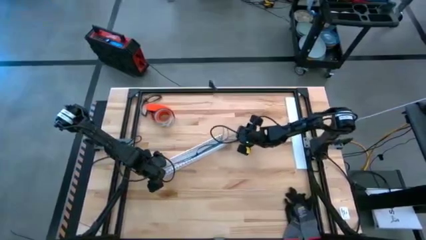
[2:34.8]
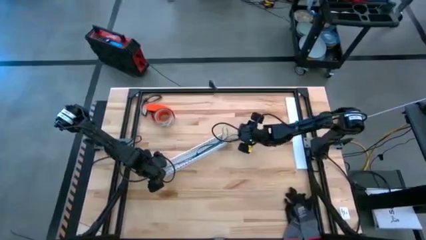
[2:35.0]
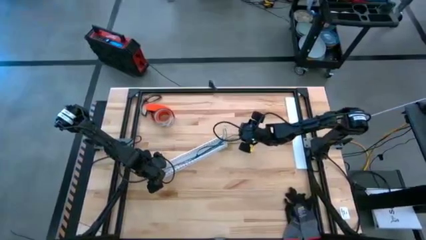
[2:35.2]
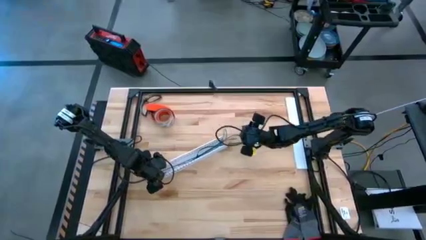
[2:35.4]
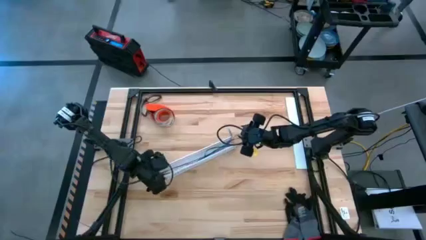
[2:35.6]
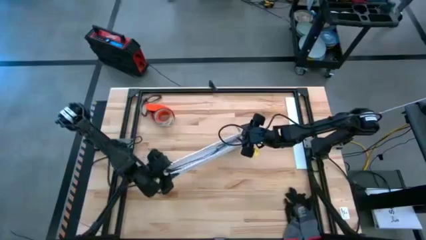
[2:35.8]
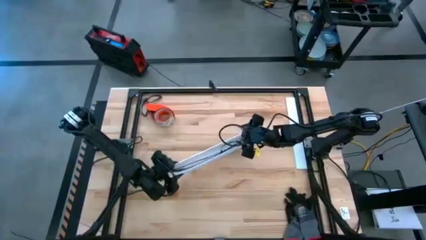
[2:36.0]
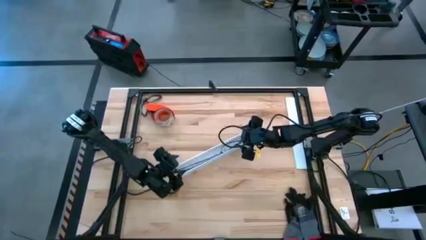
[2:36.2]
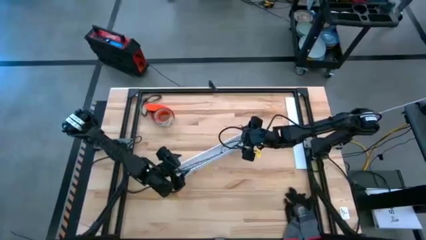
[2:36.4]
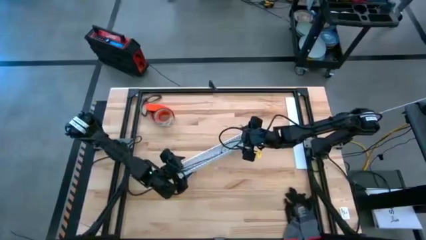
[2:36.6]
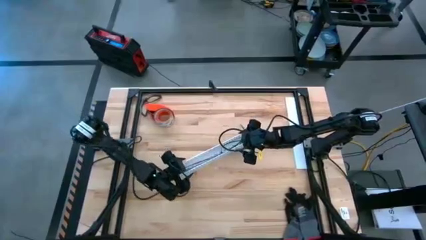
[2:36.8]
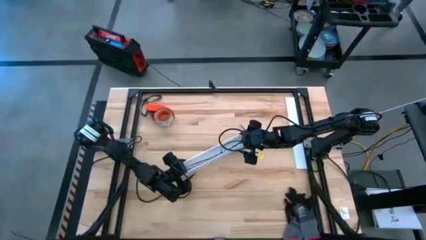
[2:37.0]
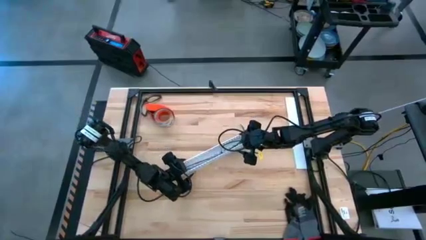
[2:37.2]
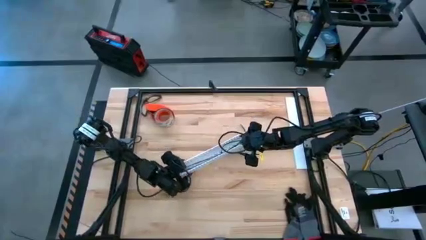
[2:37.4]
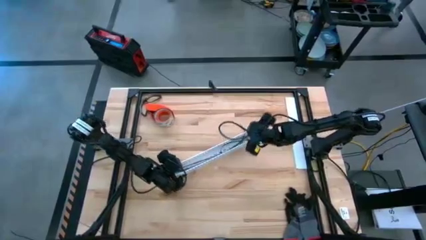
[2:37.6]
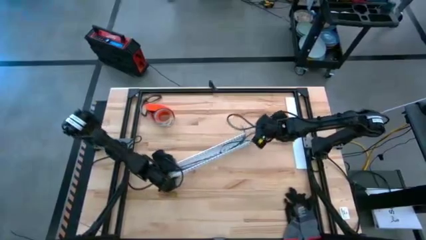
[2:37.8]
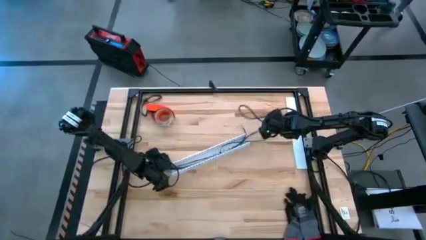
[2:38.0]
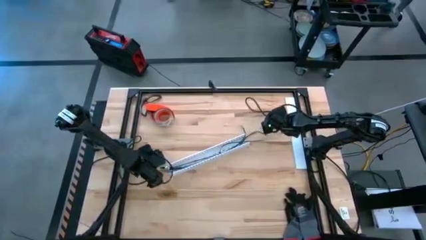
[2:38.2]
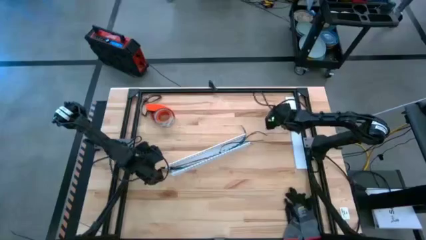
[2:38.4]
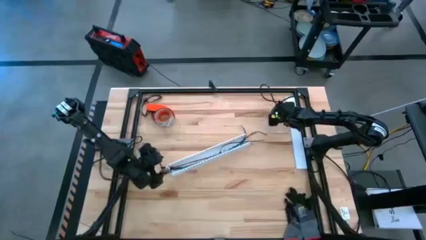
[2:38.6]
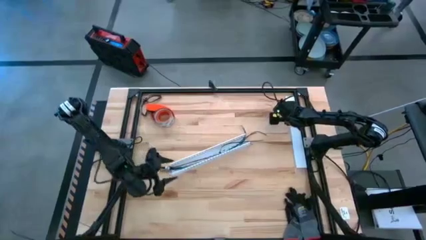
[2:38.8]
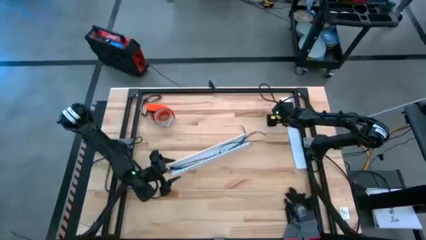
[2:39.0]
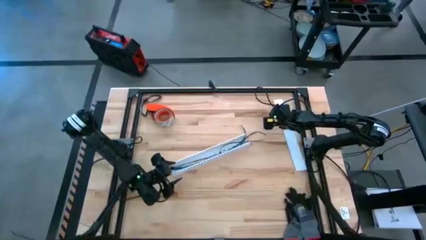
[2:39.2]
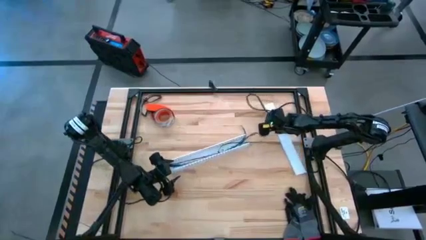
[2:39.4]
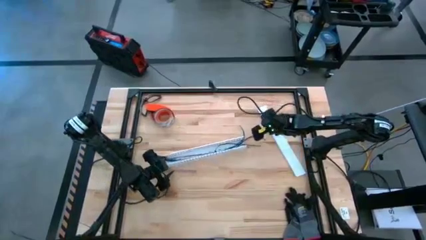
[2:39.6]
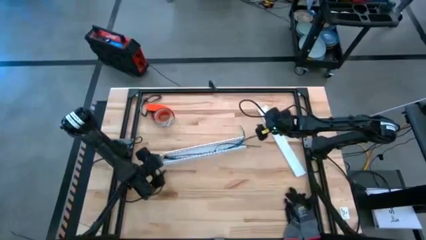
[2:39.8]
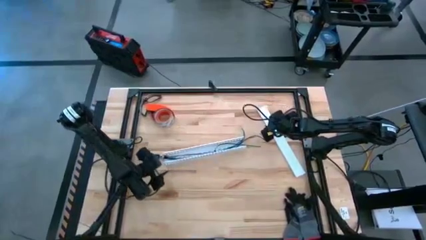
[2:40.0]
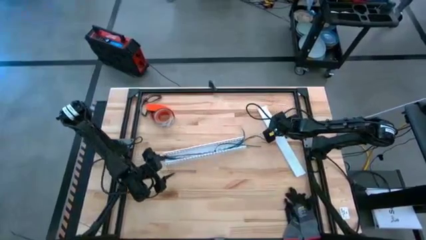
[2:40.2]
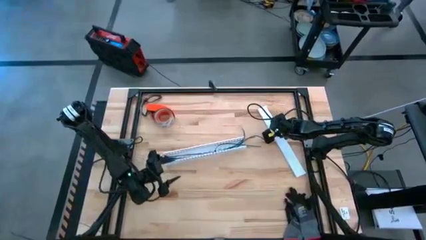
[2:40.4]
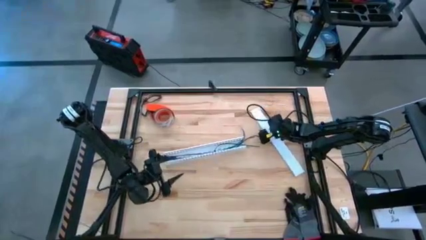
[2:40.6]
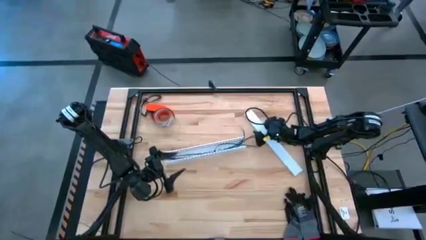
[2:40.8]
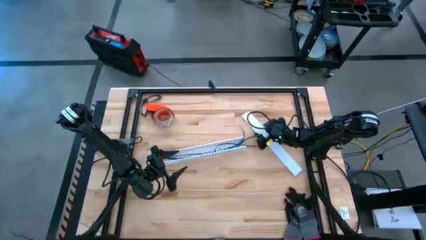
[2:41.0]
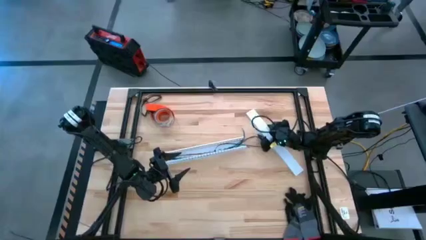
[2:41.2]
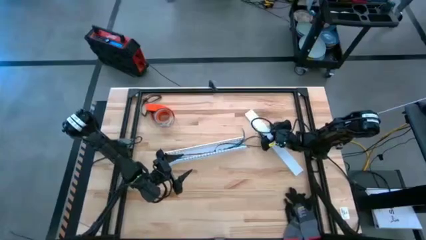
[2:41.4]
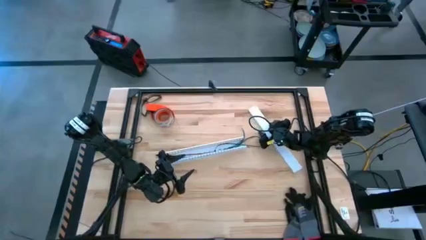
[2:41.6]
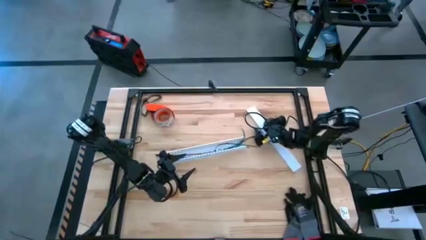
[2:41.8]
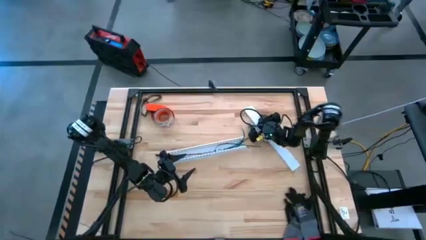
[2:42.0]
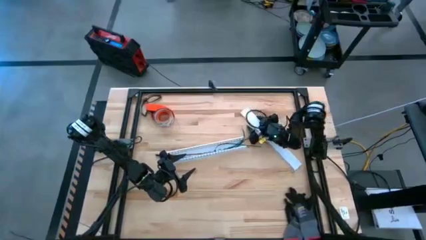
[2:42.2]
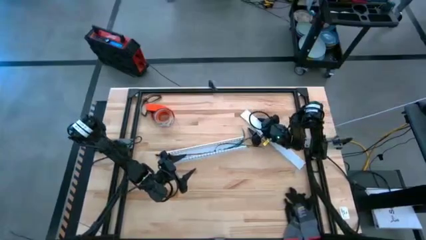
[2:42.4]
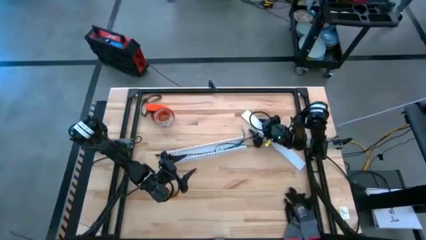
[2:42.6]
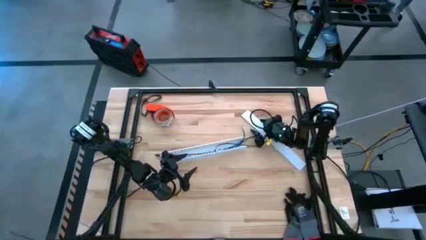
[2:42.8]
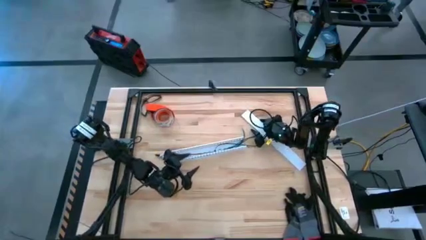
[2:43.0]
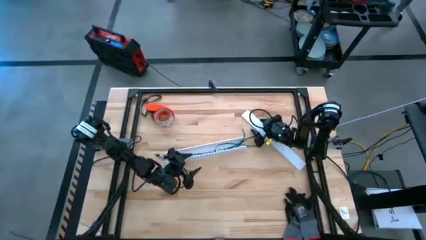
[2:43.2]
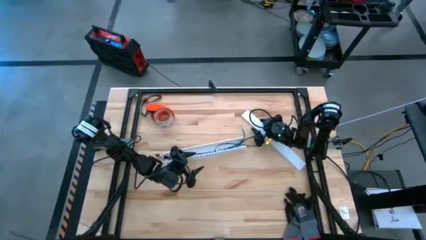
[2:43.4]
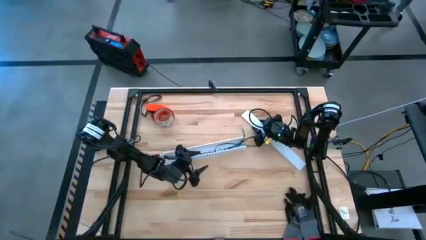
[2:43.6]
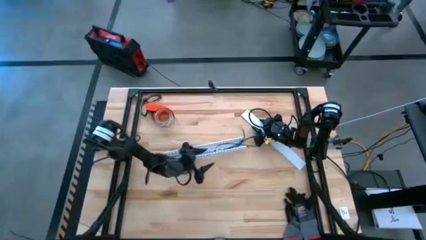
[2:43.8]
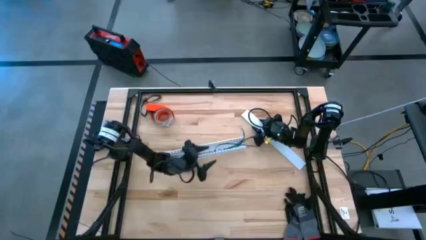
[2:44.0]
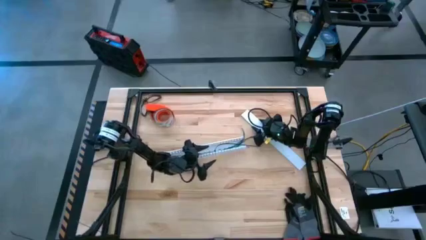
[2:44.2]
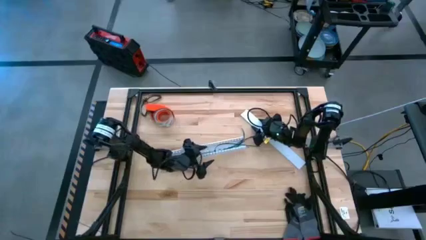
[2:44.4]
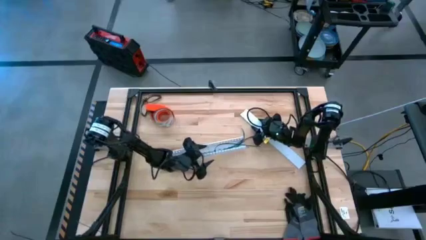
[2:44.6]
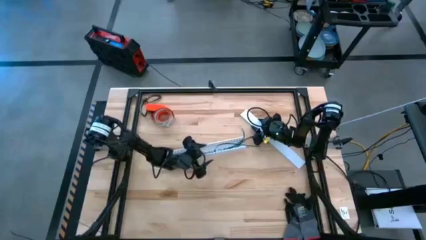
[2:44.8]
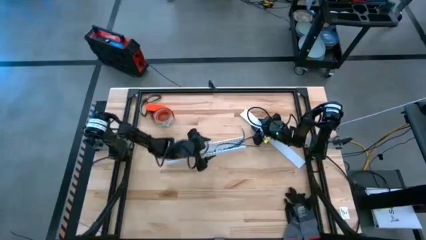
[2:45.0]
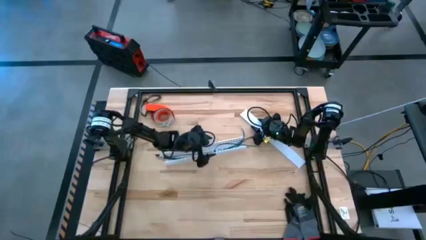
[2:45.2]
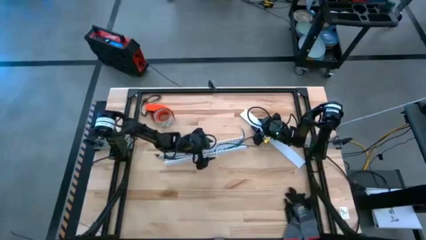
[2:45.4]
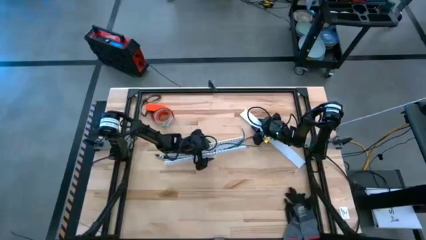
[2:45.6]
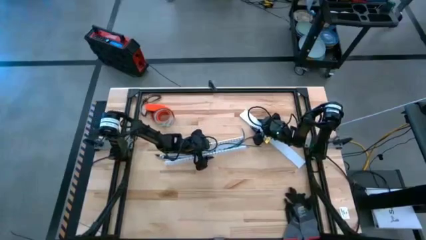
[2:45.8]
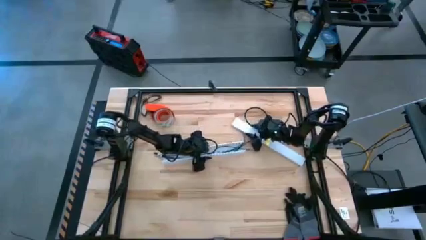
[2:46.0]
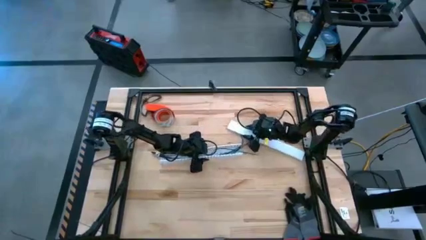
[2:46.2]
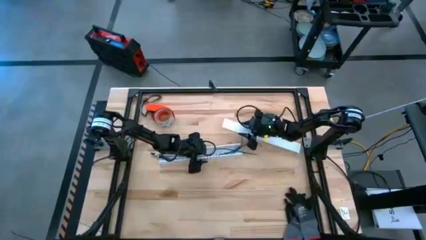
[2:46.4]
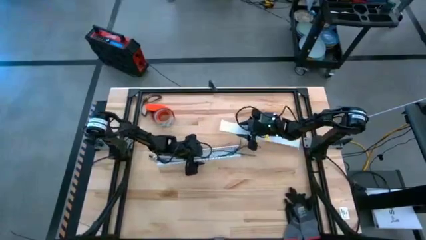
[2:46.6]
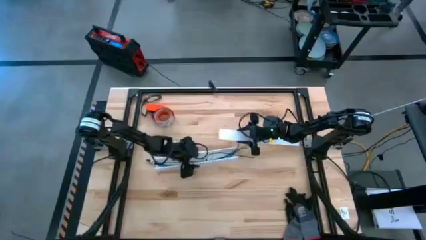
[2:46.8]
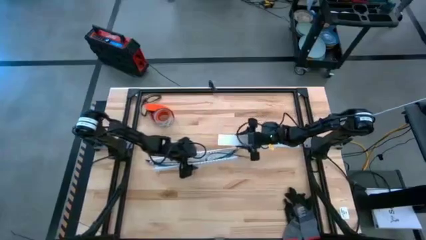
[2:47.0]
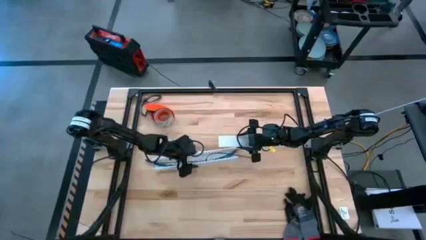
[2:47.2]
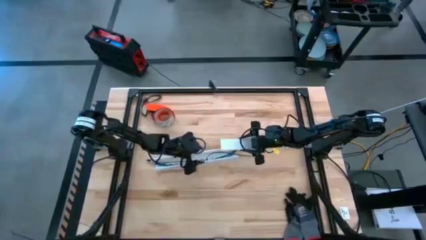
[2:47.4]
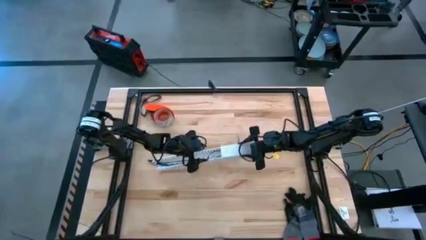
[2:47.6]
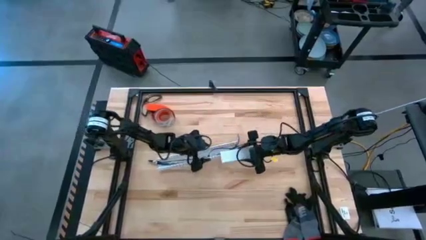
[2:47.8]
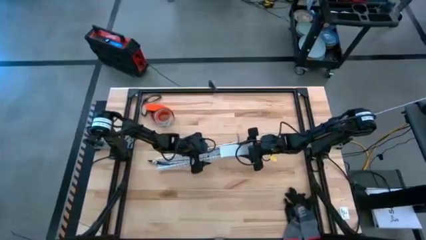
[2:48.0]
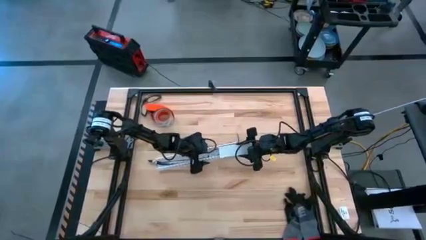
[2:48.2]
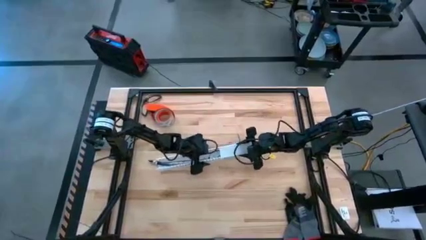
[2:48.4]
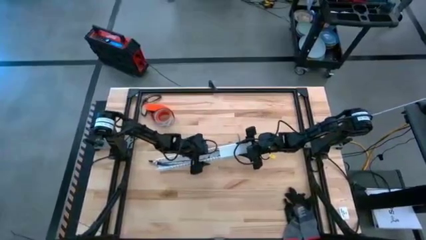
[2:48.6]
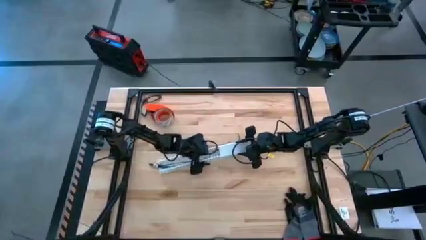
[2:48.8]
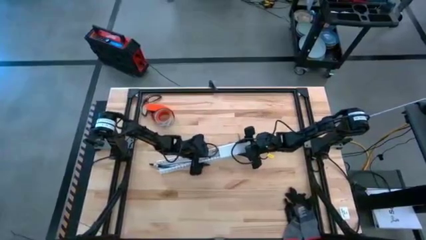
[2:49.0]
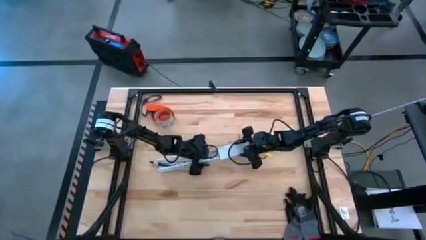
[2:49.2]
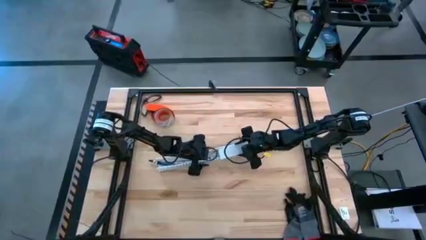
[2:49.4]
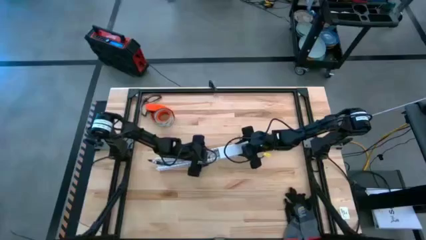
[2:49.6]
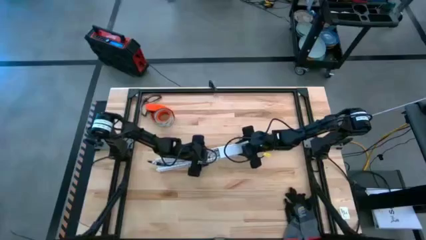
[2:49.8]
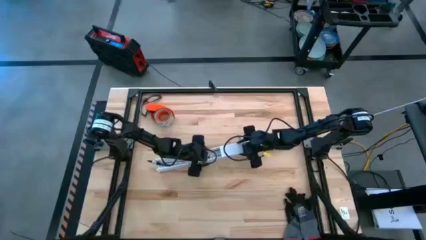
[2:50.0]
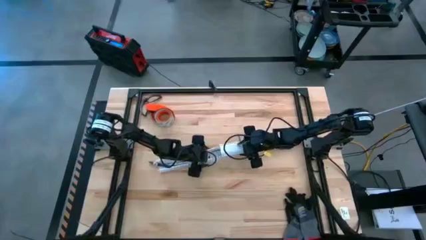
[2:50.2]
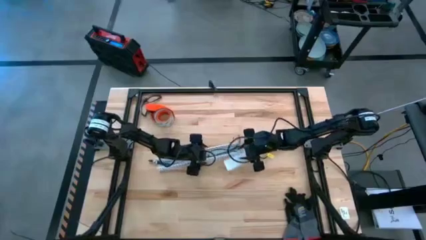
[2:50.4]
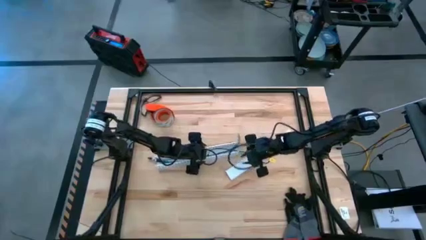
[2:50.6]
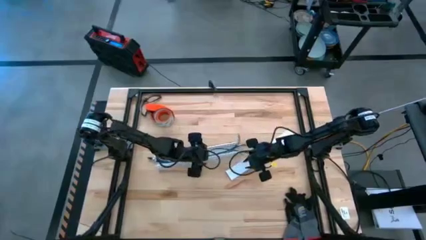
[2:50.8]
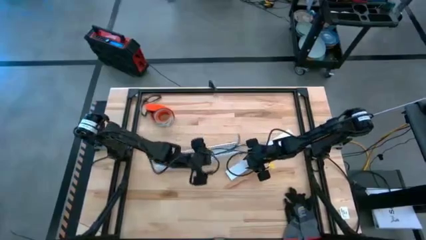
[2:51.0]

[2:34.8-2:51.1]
Task: Ziptie cables
Close the white cable duct
